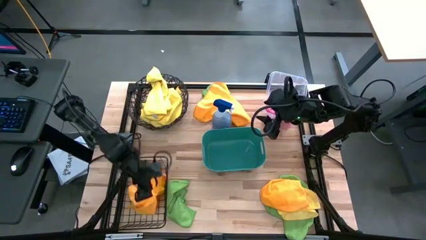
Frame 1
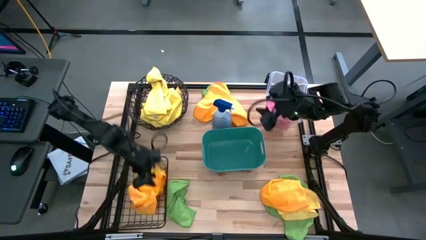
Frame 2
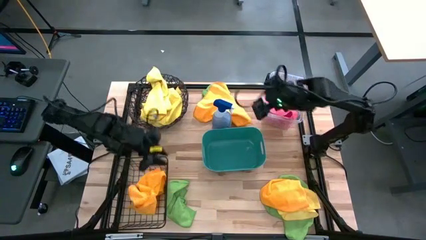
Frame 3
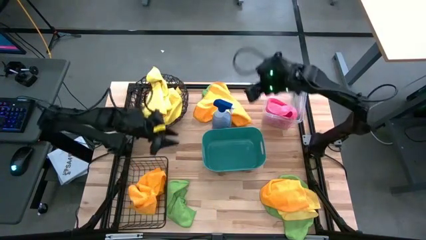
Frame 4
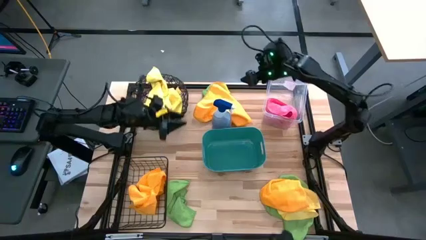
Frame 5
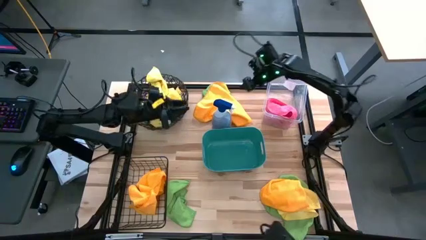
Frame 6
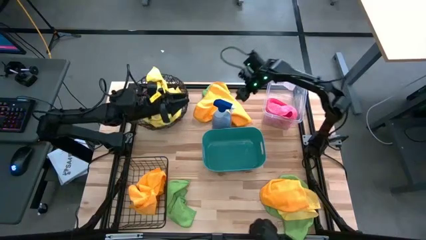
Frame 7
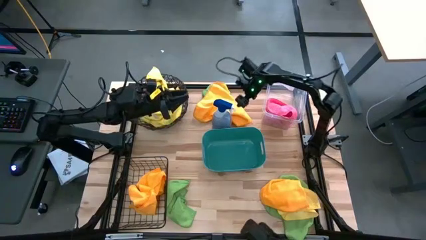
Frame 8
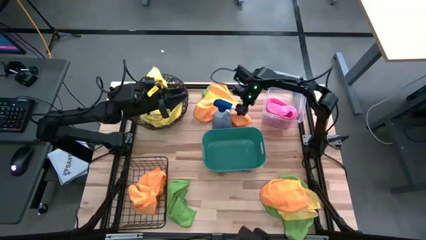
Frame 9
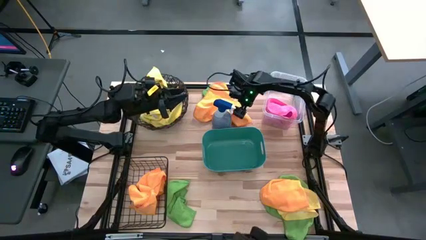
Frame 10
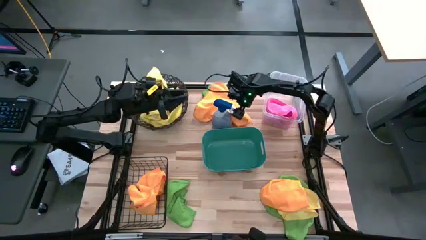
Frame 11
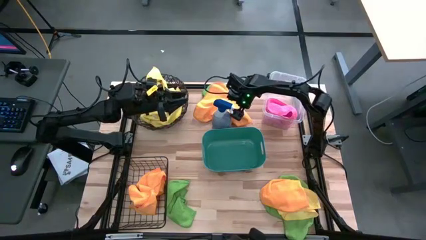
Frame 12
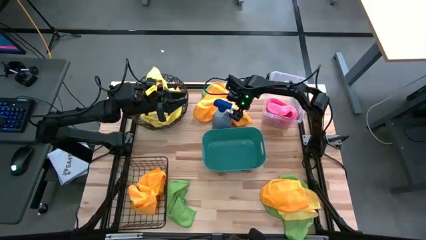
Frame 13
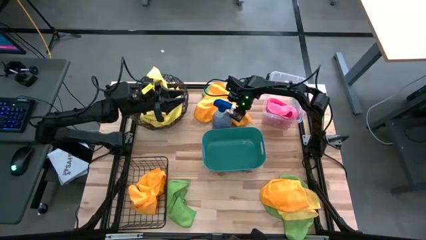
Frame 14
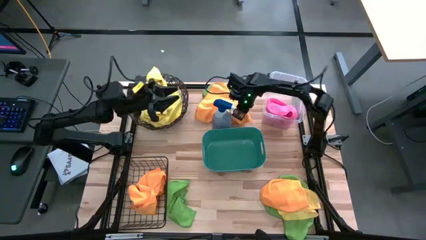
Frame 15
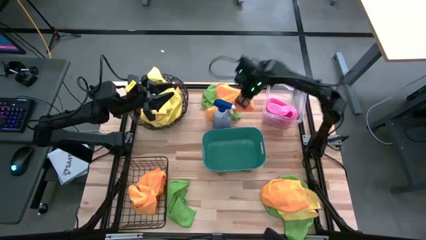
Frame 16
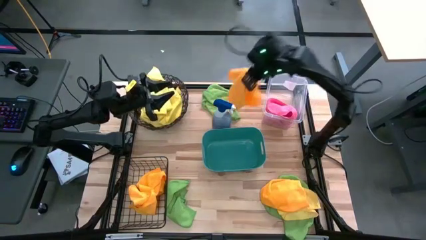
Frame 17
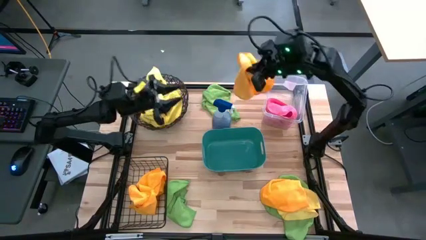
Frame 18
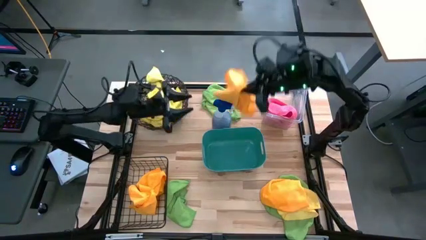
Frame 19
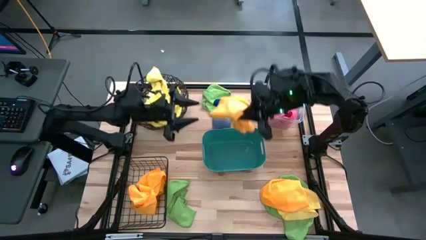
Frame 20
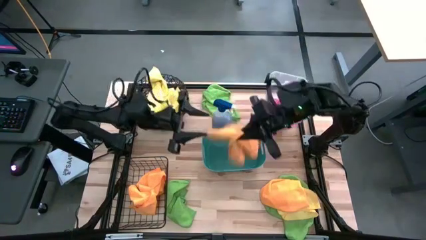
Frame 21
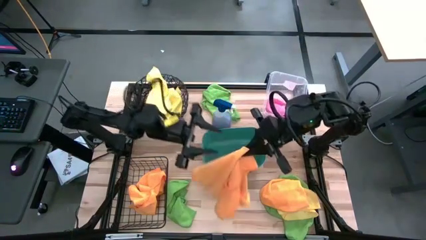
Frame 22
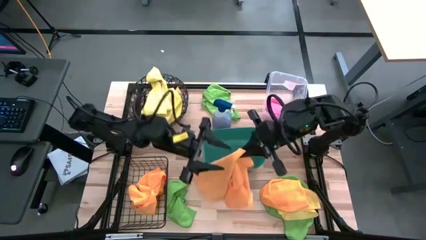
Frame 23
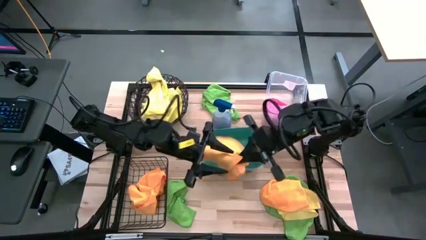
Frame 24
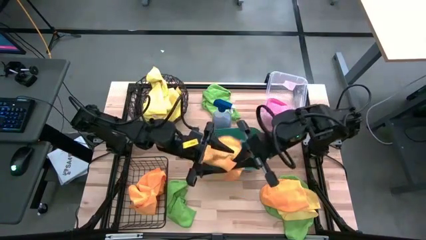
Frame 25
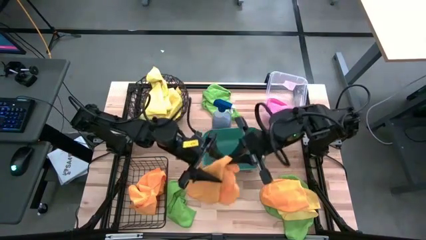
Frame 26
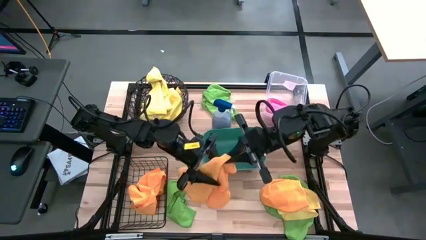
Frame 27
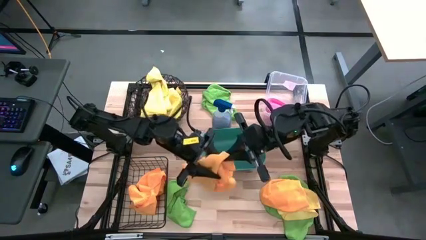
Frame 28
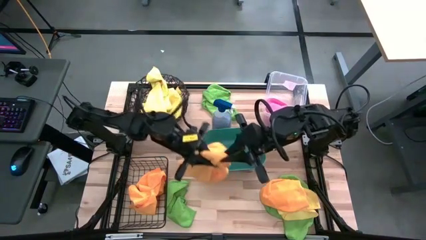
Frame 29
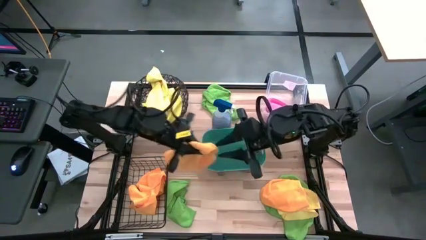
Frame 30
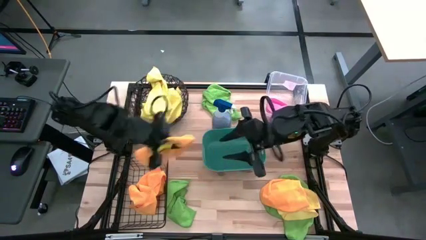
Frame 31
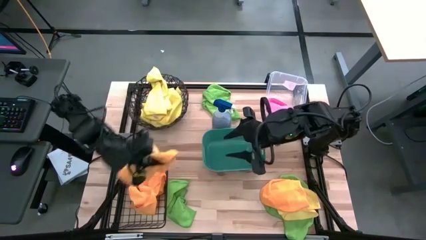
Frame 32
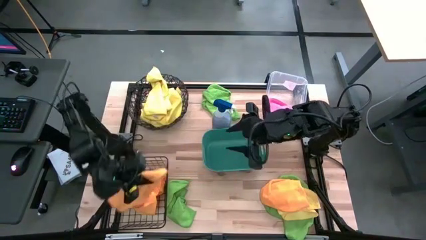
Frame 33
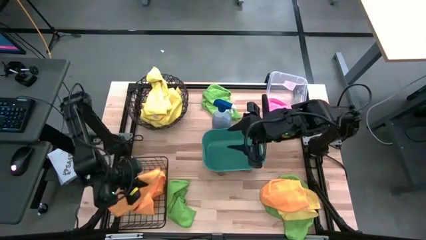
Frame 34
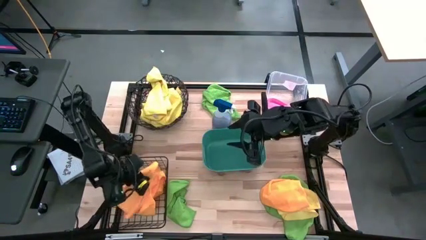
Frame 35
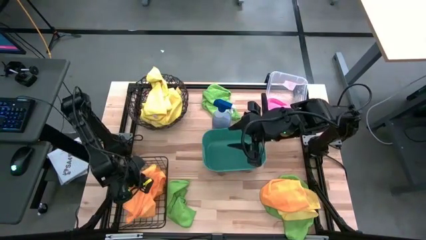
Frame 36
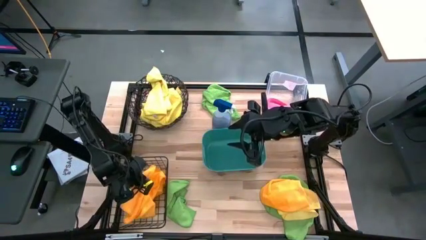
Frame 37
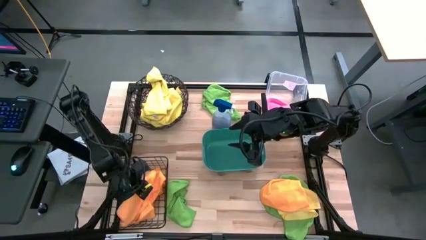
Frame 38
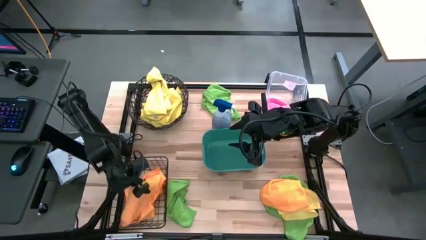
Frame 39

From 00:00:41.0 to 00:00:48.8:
Task: Sort microfiber towel by color & place in baskets
Put the top orange towel into the black wire basket

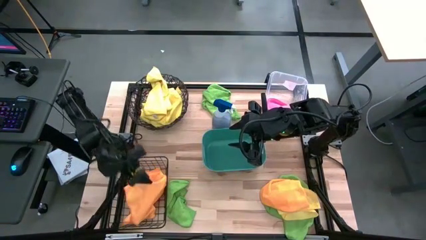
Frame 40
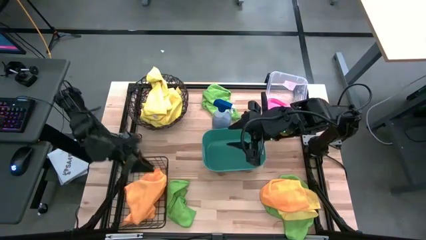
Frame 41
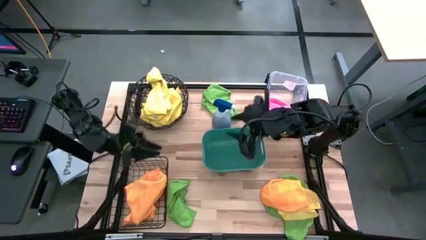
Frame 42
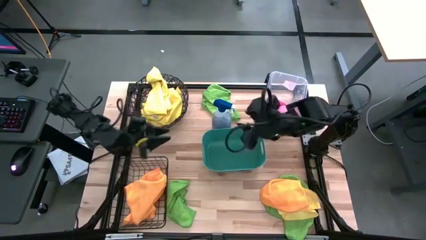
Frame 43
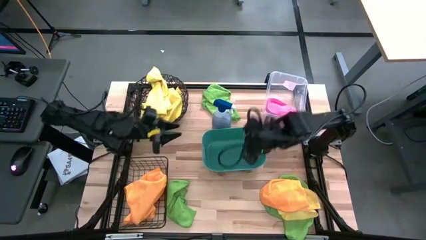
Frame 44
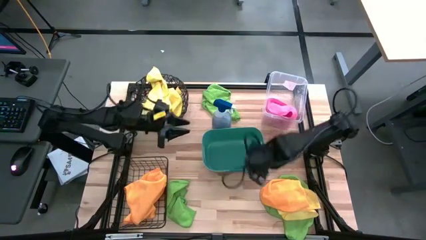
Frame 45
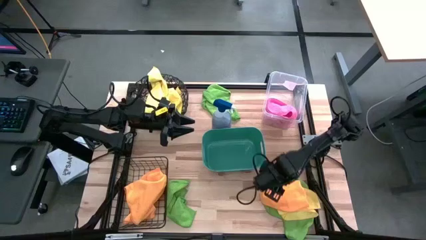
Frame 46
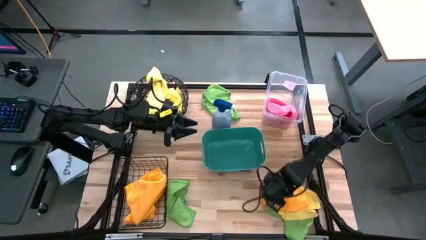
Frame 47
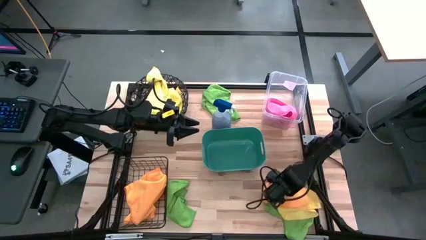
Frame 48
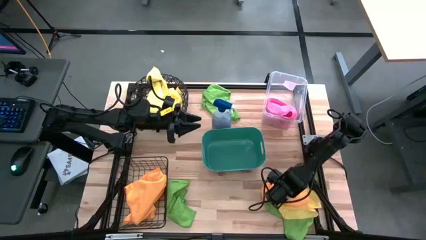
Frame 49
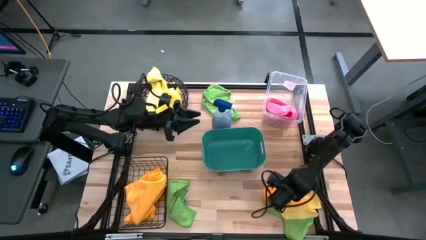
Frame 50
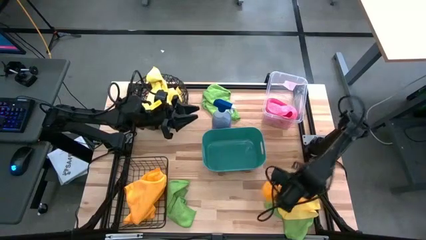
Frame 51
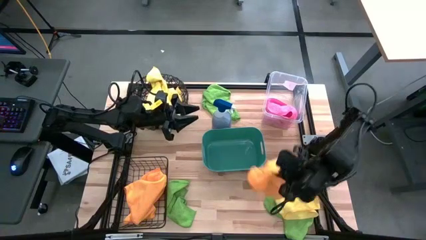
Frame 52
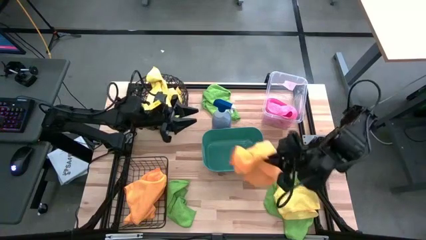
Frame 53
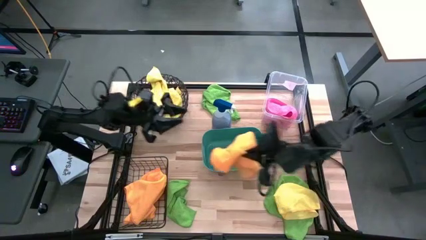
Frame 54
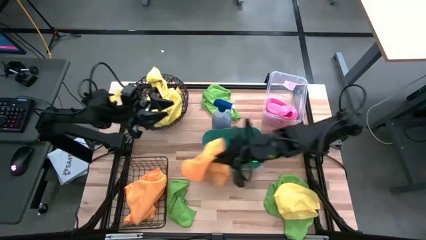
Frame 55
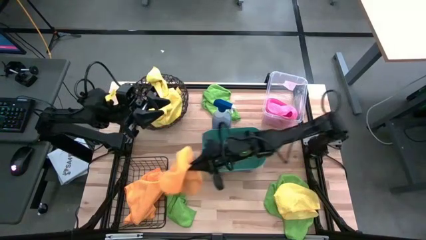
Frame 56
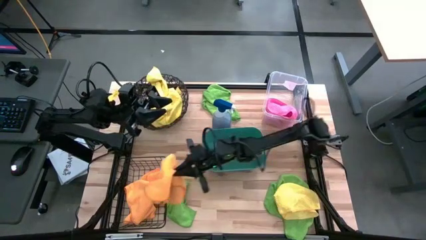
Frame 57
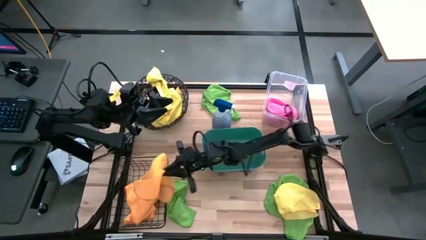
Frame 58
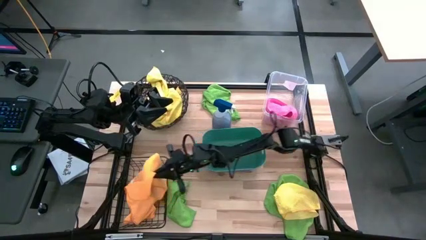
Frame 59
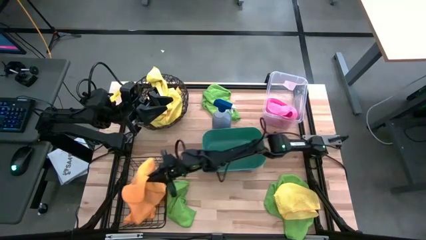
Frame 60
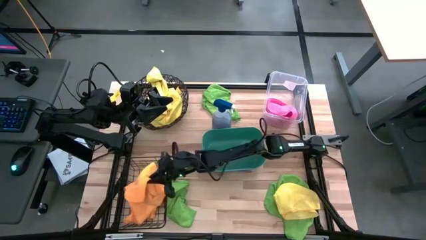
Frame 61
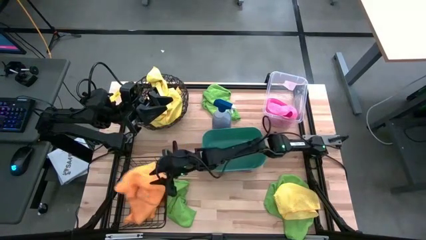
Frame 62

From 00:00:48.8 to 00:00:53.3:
Put the orange towel into the black wire basket

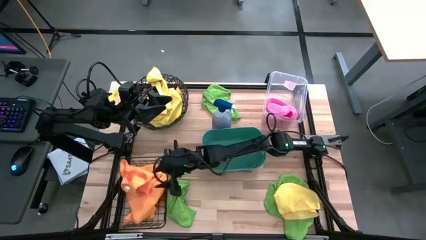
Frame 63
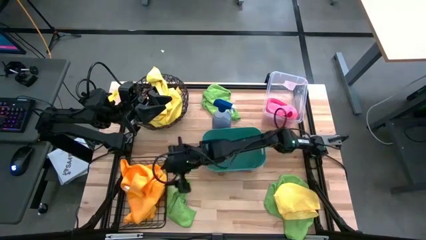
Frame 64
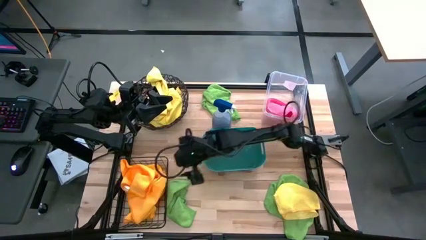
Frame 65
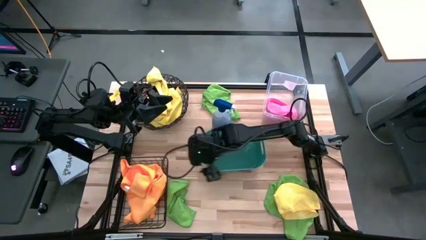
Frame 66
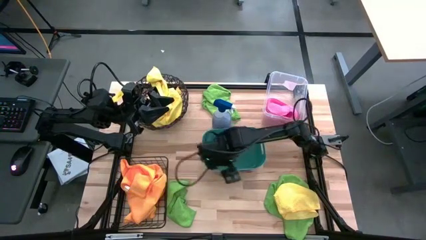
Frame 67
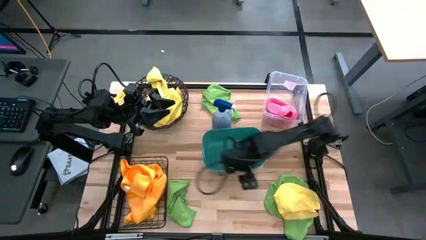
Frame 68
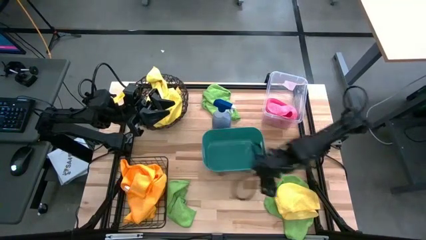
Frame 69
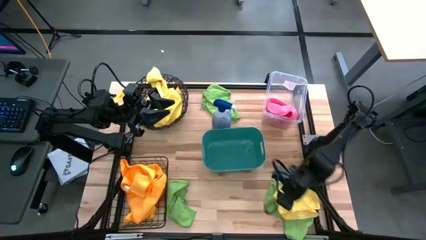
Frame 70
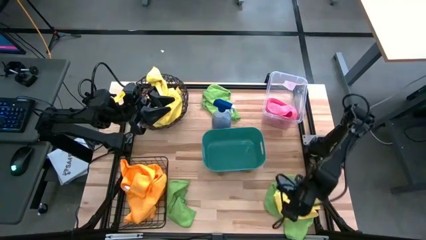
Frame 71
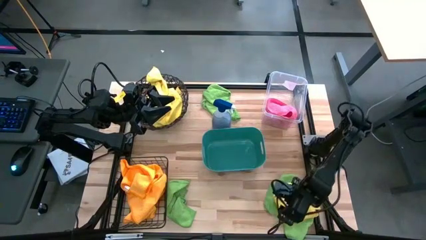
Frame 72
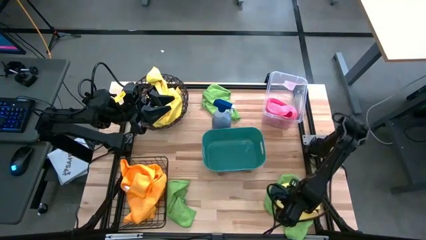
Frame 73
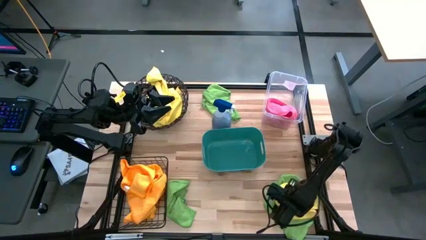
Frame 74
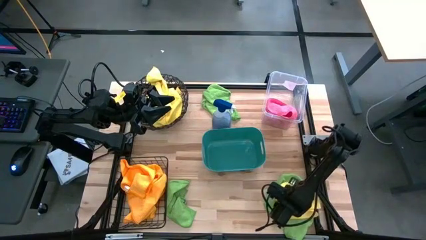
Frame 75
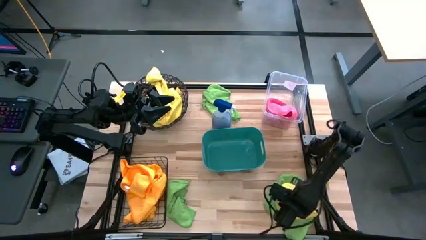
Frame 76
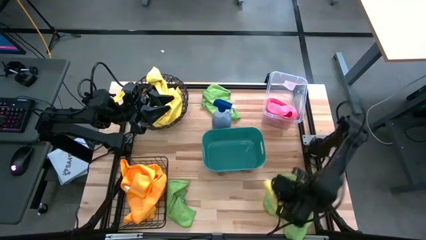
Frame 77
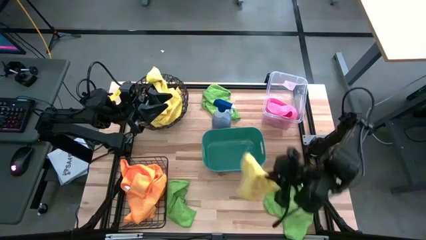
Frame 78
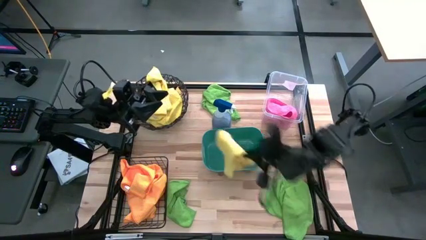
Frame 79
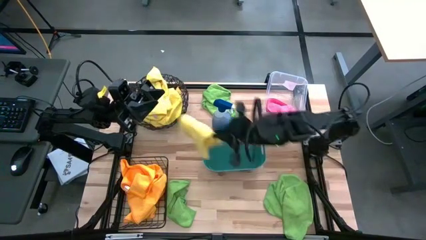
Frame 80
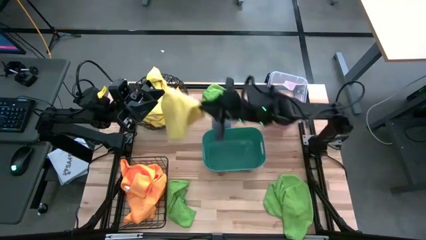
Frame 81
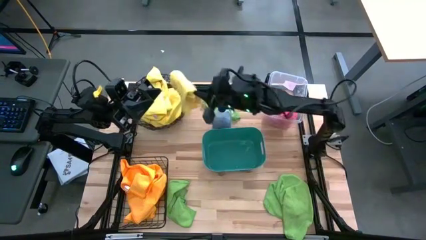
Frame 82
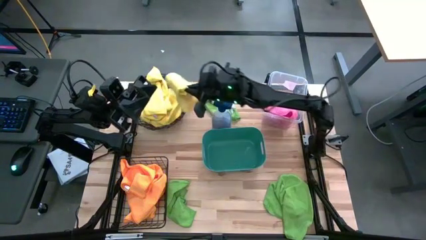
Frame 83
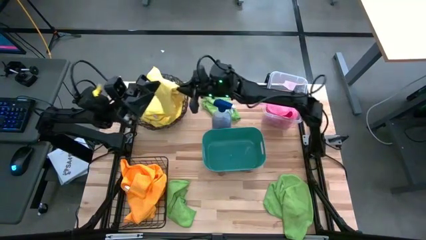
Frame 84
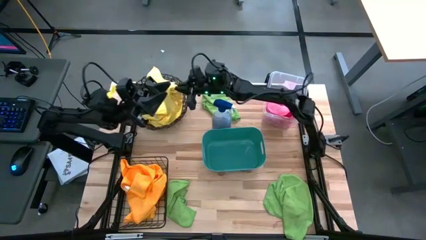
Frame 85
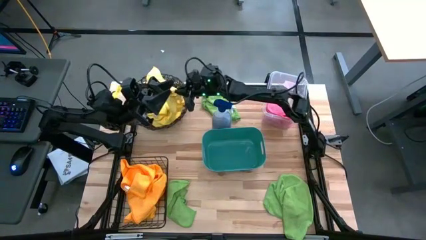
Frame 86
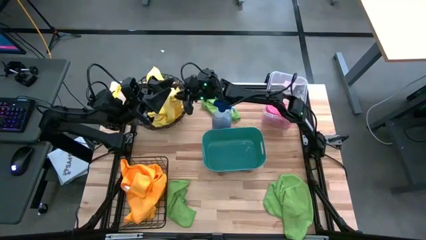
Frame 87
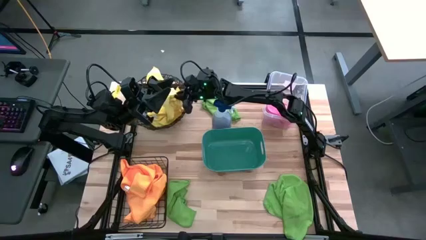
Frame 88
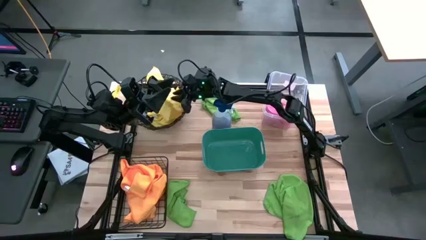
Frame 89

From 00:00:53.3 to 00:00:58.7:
Put the yellow towel into the round brown basket
